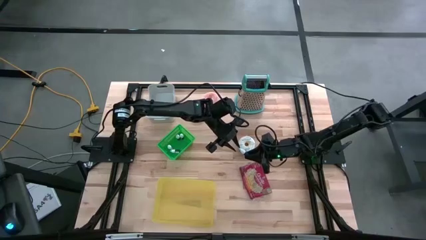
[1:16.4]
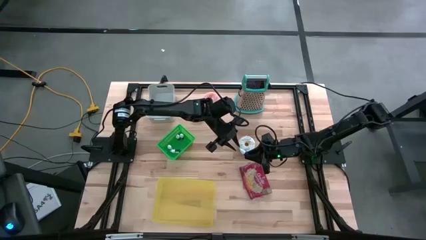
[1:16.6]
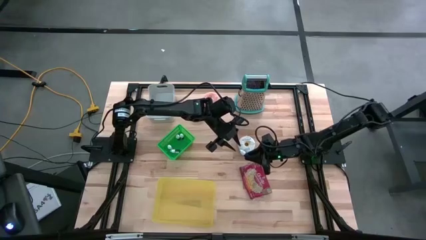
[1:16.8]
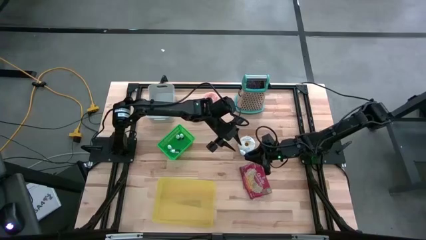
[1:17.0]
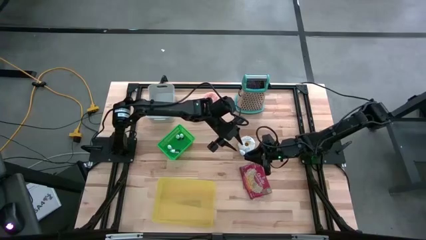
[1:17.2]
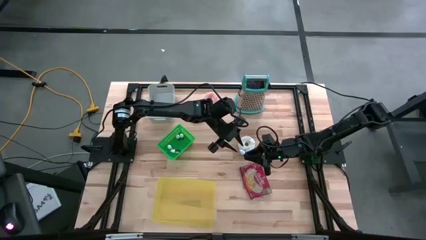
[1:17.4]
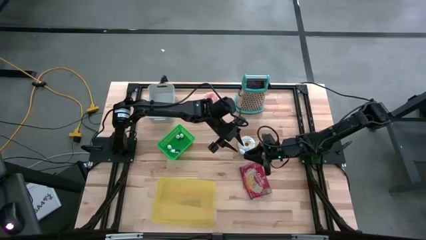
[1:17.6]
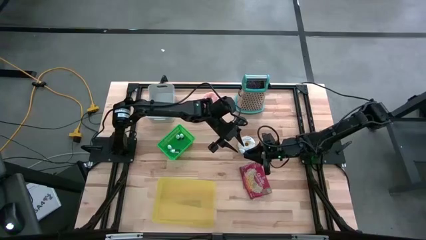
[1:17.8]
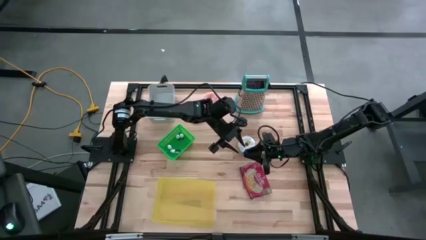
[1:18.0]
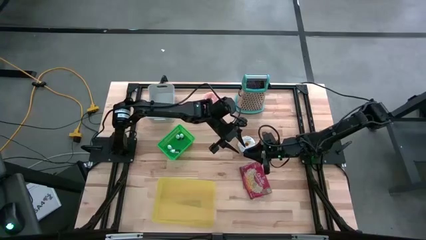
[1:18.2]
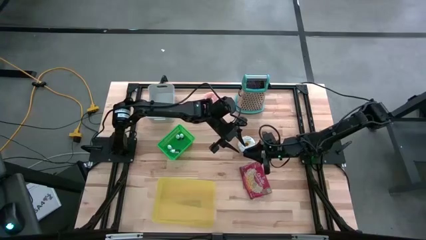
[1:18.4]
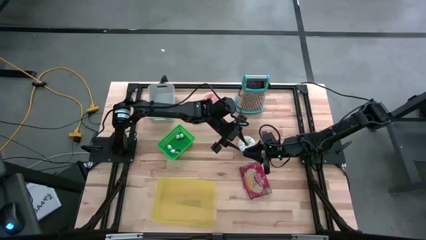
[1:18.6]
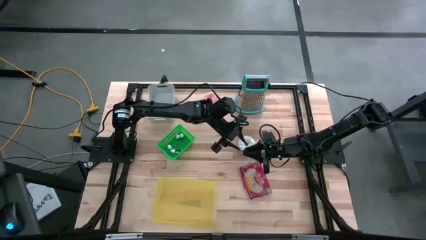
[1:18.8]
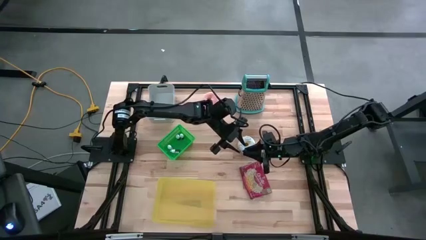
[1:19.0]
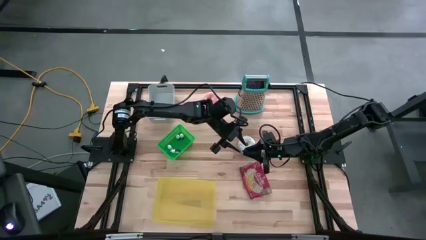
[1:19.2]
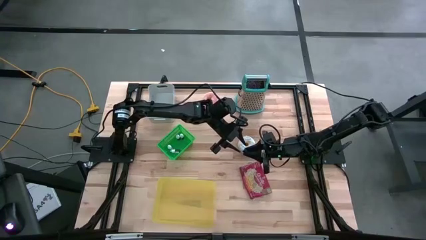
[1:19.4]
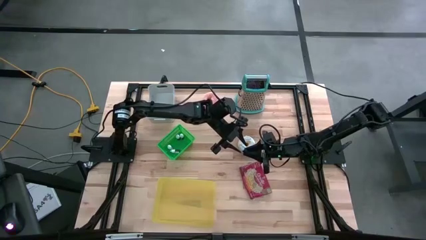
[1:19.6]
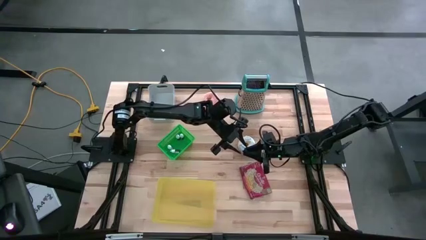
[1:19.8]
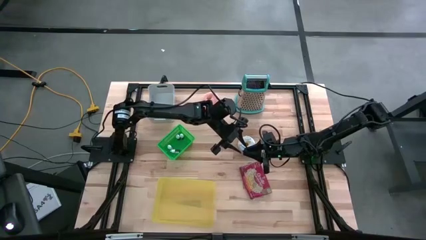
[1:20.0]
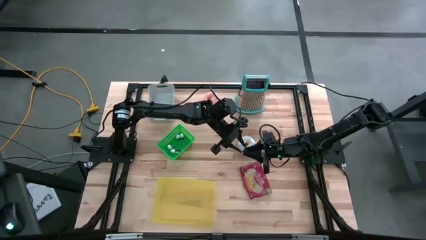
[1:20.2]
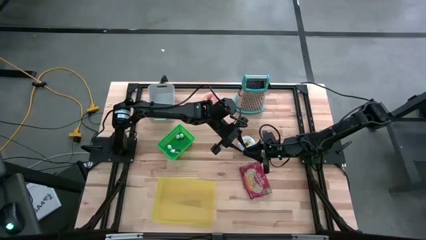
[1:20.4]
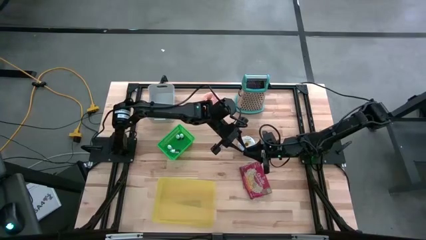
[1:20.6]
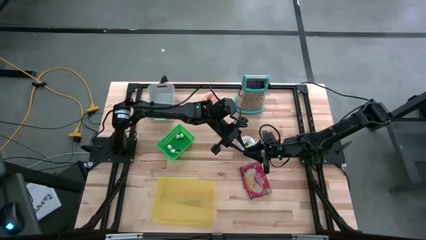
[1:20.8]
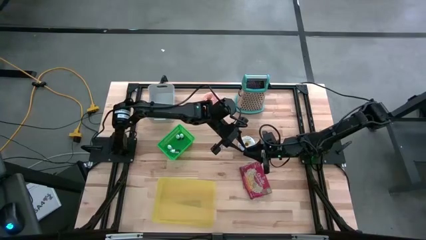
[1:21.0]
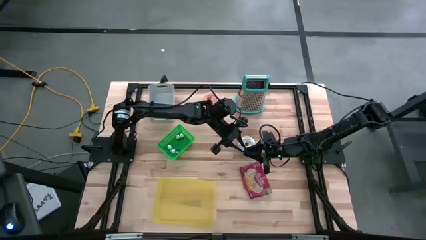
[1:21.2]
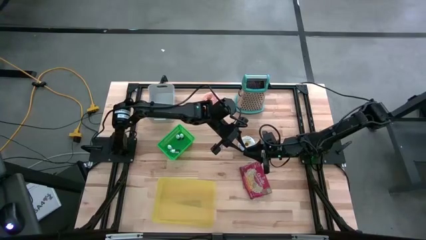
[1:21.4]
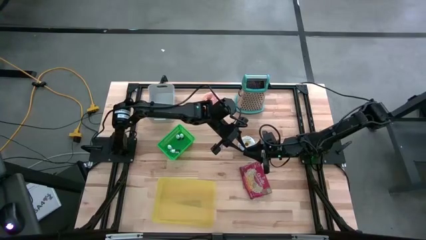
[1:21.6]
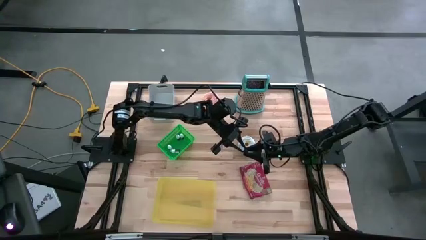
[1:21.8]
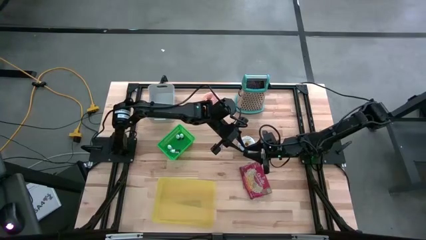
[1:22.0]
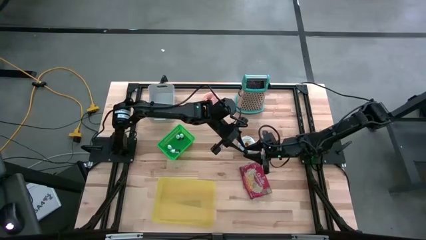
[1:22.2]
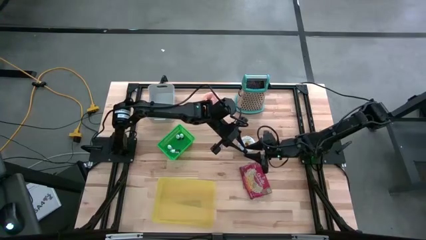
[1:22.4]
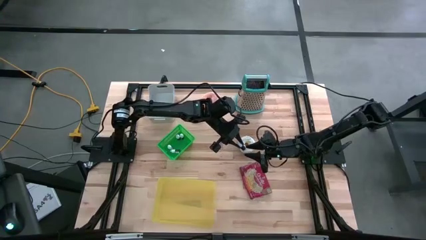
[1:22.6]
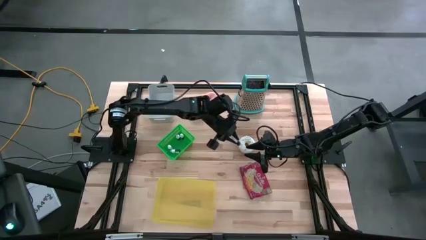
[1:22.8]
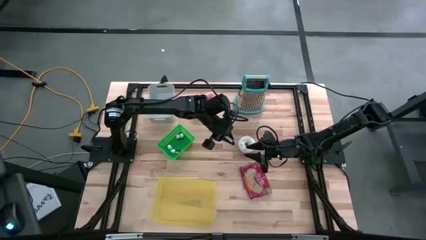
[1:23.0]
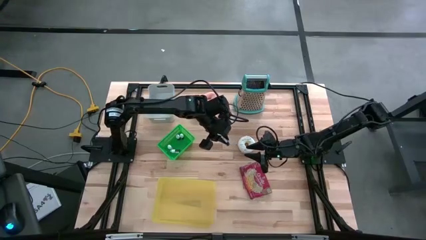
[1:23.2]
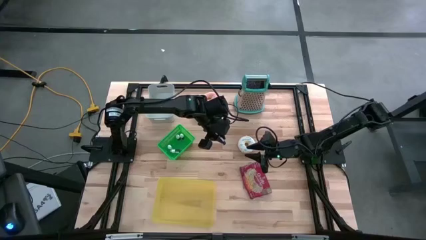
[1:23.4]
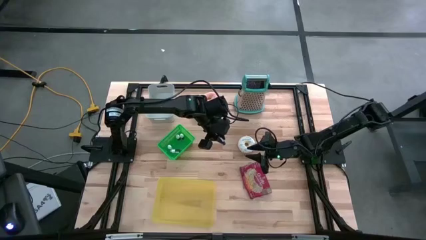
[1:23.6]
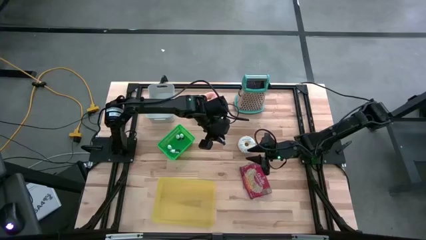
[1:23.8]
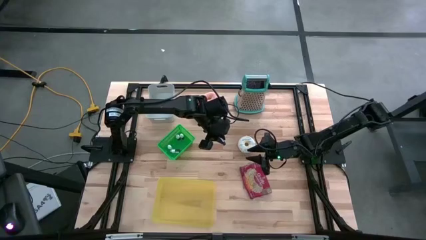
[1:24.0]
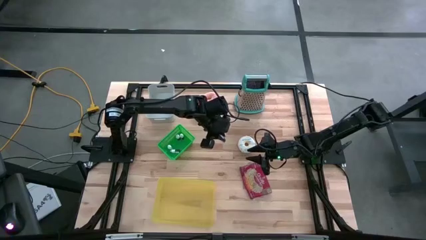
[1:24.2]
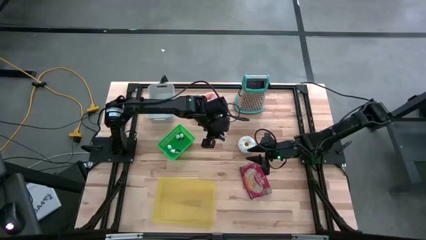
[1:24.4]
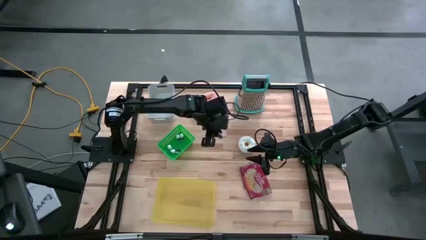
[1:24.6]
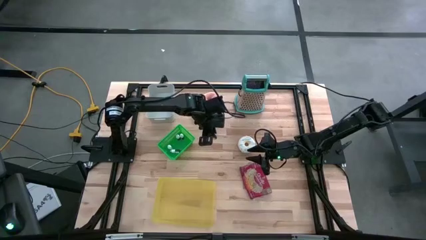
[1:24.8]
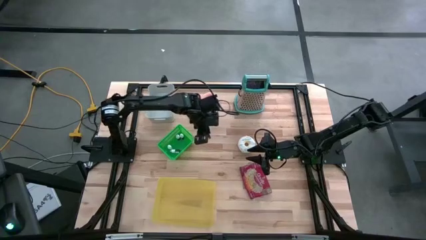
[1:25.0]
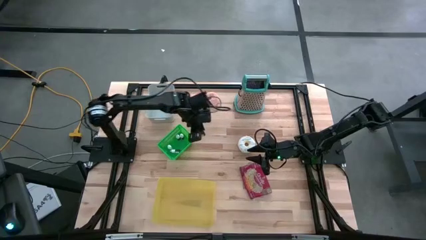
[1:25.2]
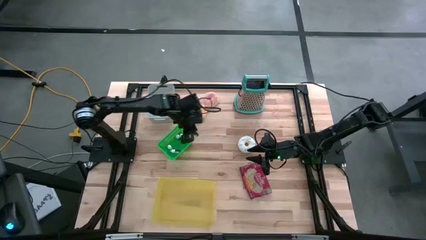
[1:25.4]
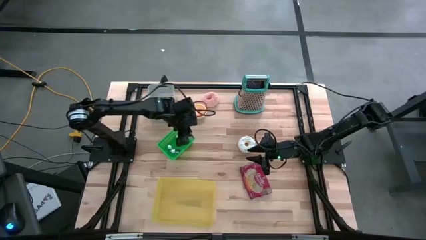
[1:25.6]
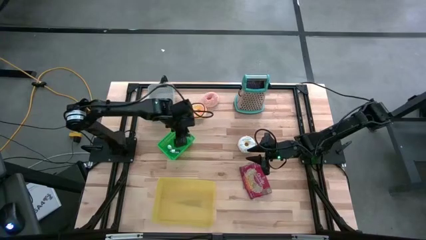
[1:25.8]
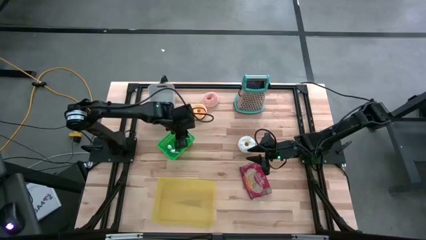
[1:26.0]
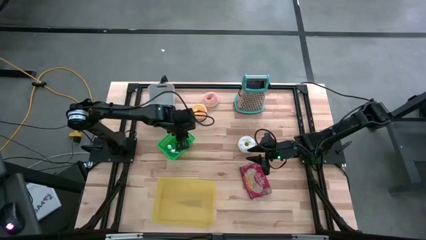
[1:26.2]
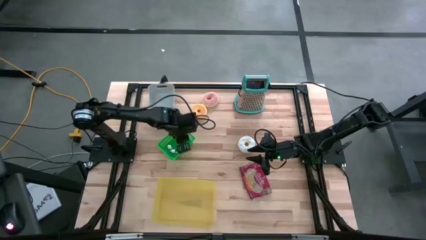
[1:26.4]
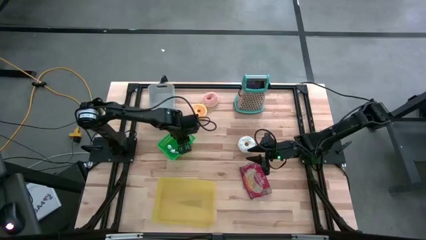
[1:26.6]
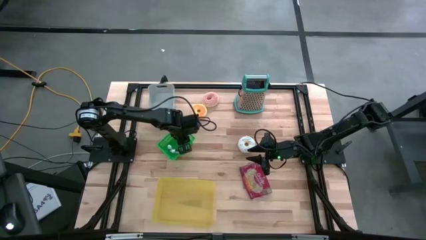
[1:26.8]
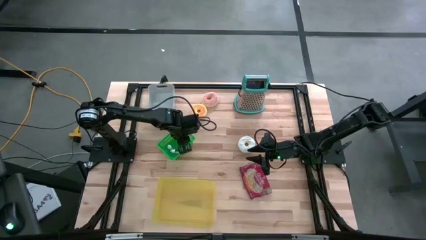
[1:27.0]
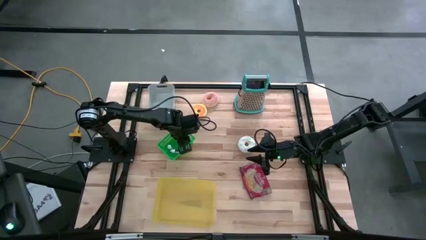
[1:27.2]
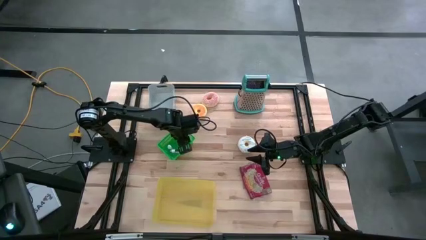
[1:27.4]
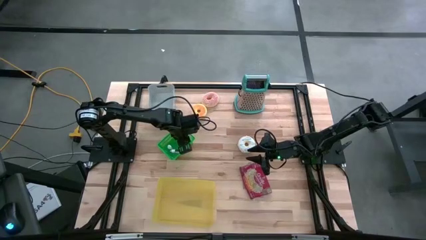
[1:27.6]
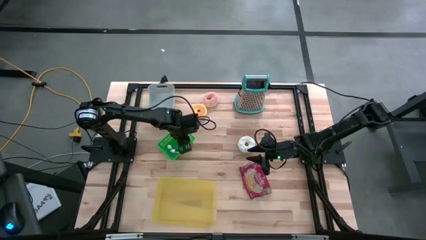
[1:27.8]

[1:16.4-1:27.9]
Put the black bottle into the green basket
